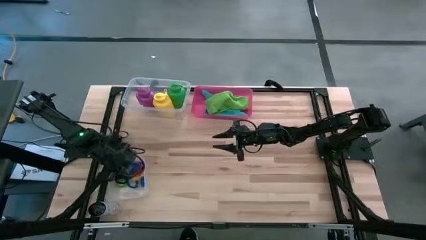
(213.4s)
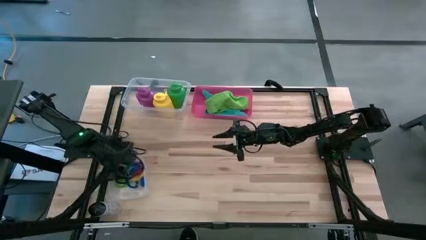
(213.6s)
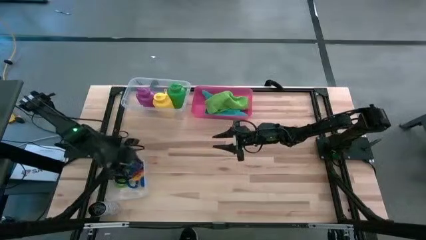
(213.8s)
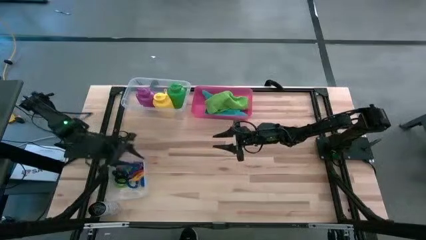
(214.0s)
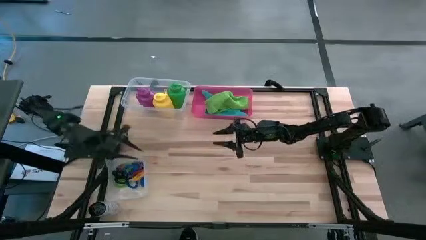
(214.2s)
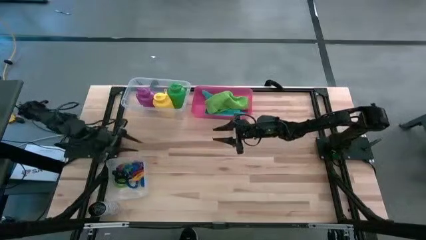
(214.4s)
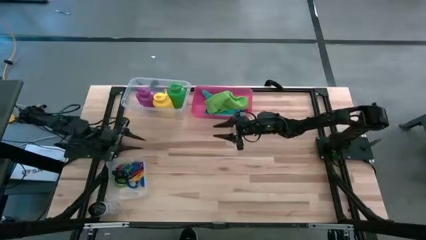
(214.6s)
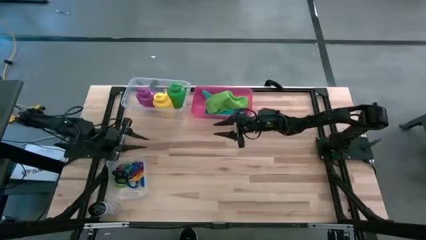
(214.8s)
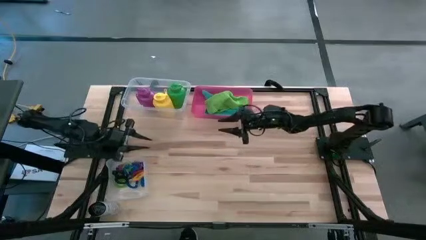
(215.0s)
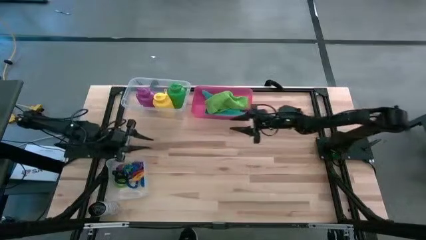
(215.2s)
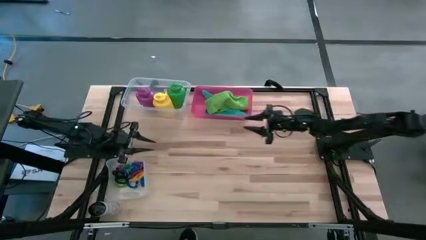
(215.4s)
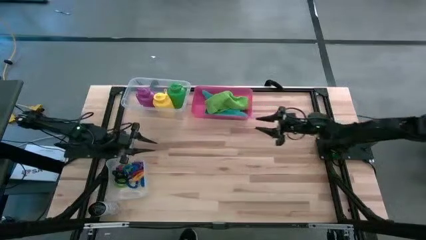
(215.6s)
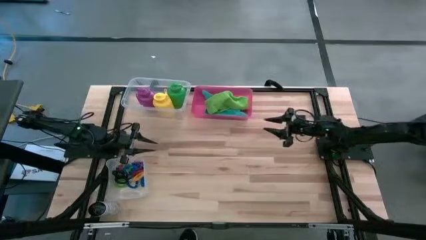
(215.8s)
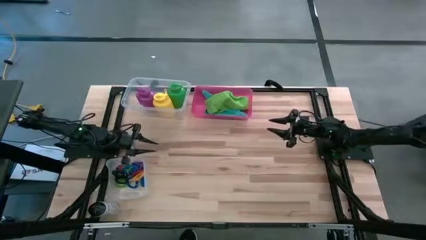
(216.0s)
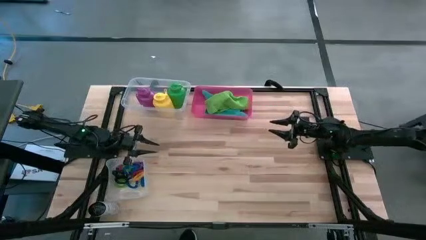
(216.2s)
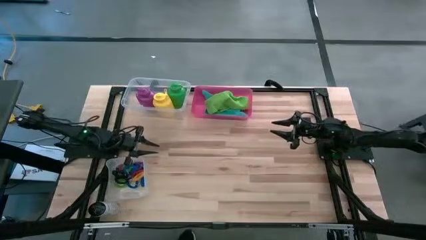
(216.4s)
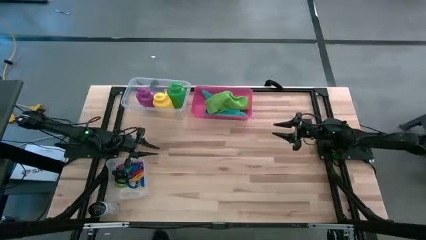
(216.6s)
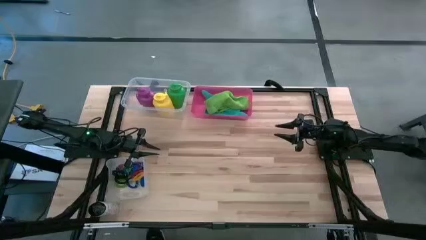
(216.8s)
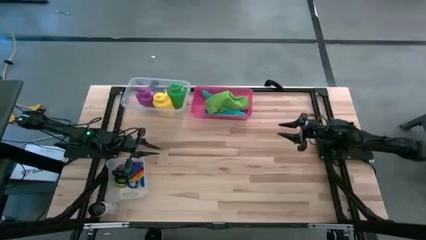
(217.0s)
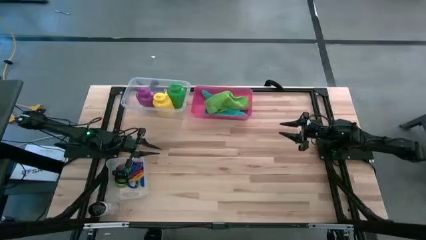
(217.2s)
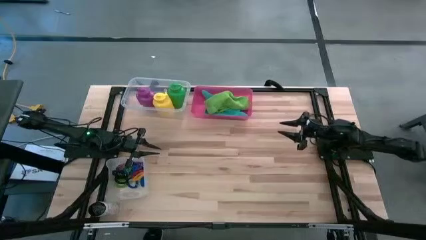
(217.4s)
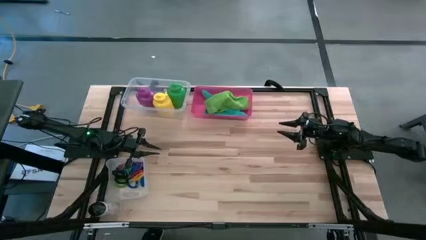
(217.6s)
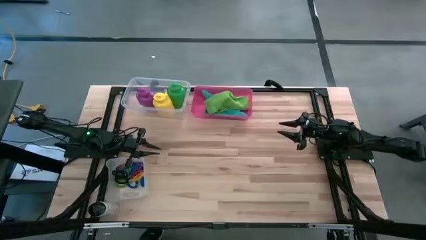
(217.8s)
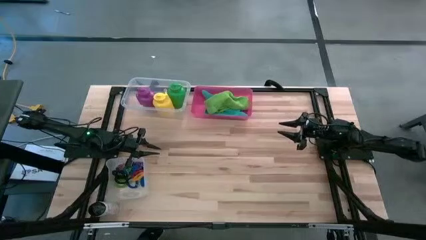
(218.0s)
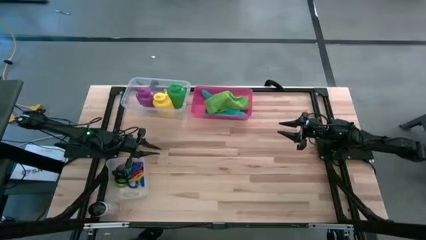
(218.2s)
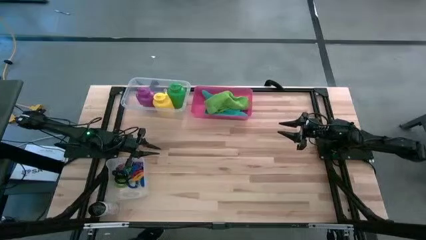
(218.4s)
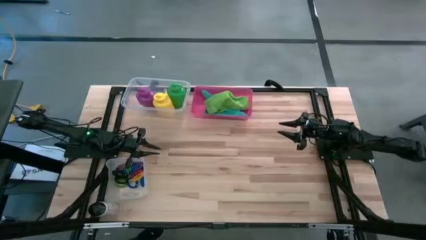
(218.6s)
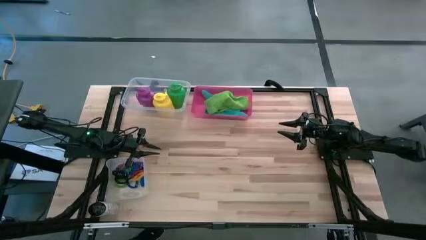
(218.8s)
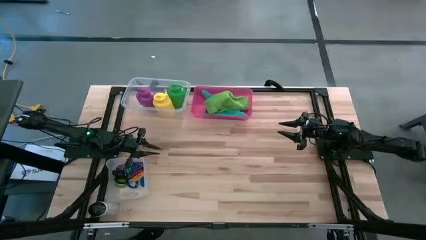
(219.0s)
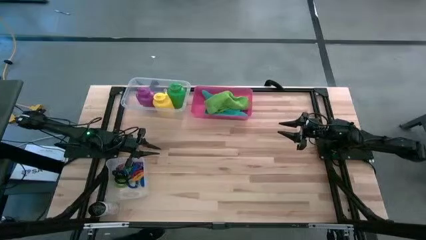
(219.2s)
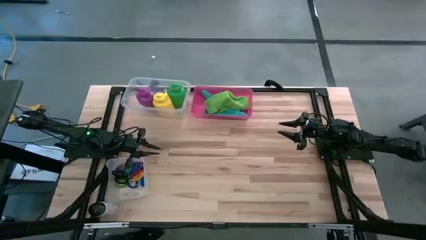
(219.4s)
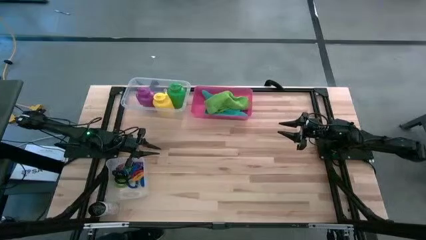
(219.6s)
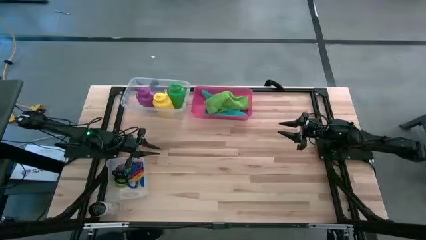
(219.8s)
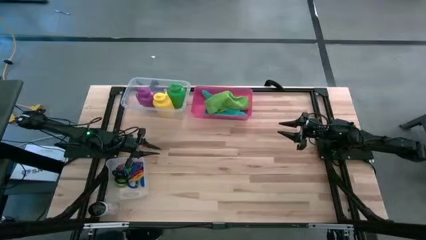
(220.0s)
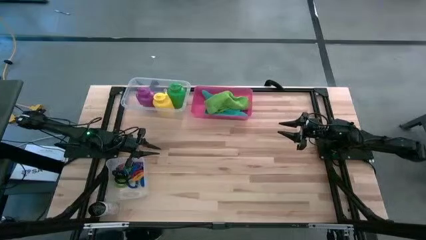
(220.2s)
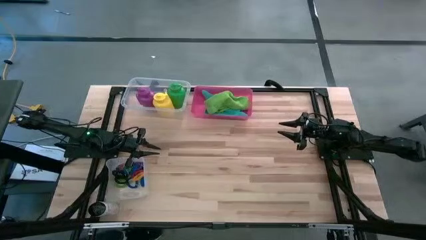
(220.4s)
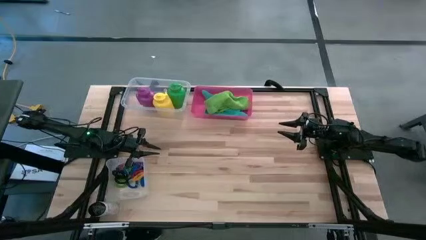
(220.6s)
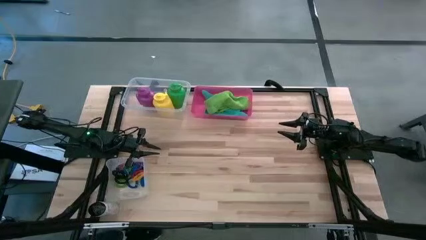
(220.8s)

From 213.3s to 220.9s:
Task: Pick & Place Sports Items
Return to Home Position

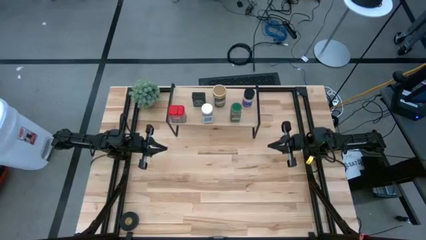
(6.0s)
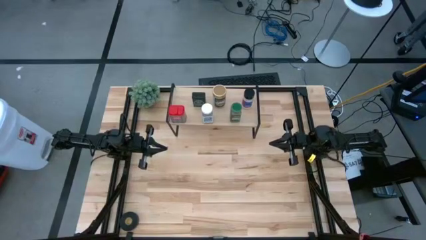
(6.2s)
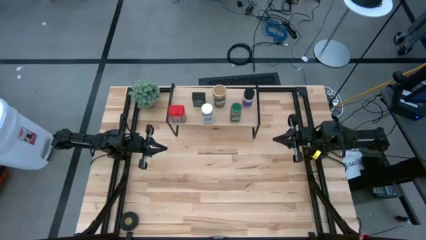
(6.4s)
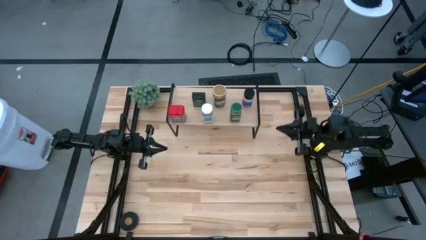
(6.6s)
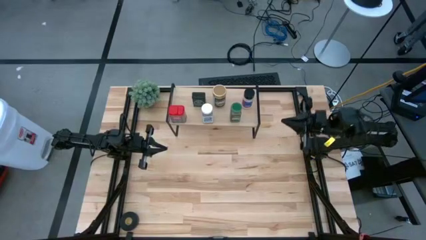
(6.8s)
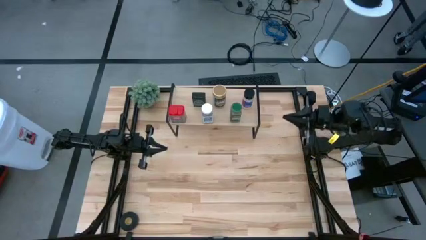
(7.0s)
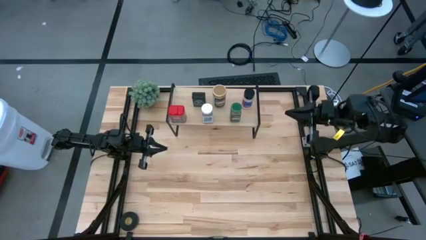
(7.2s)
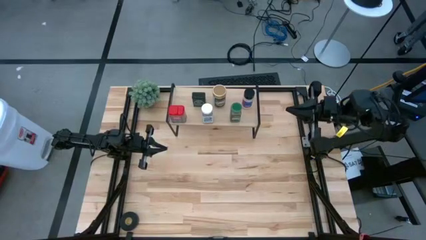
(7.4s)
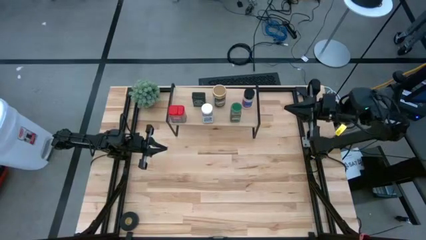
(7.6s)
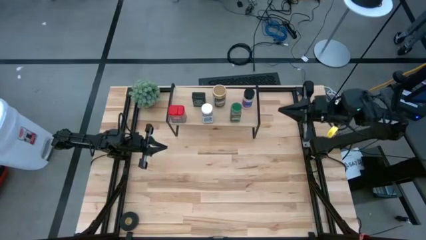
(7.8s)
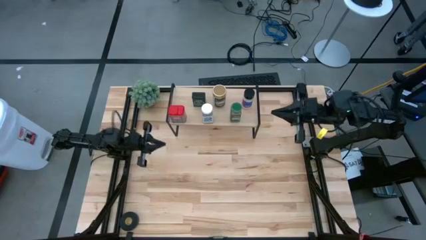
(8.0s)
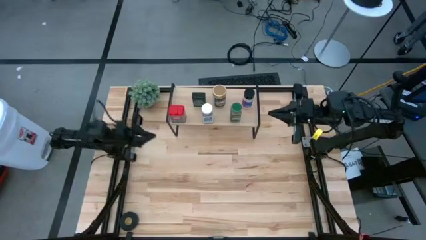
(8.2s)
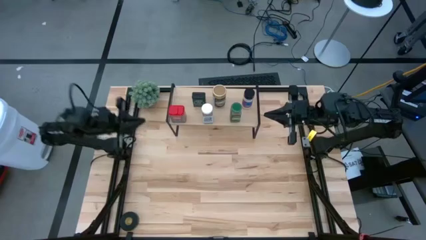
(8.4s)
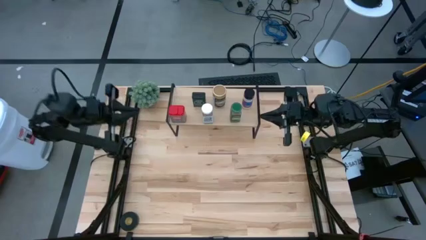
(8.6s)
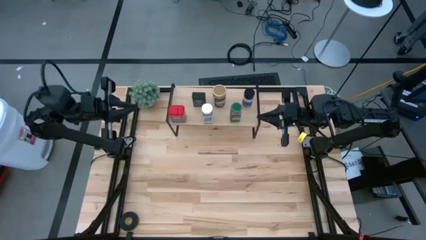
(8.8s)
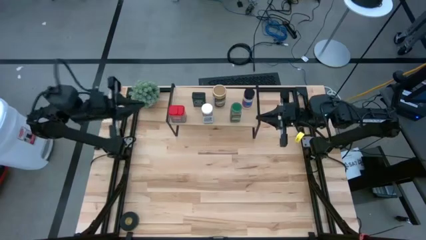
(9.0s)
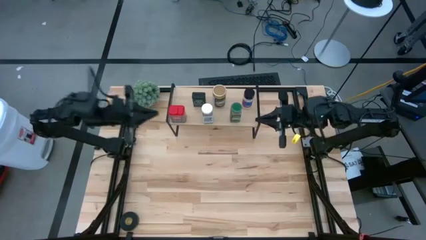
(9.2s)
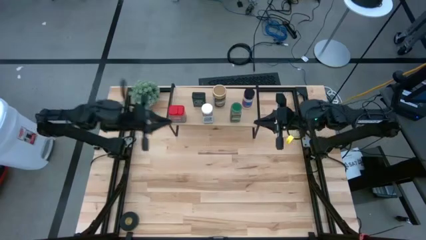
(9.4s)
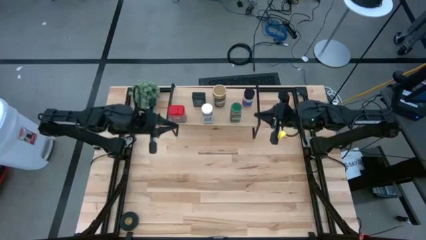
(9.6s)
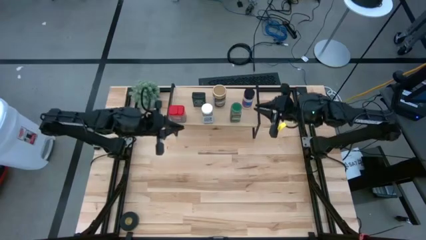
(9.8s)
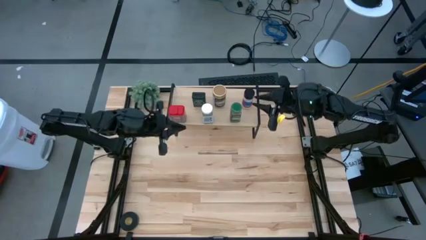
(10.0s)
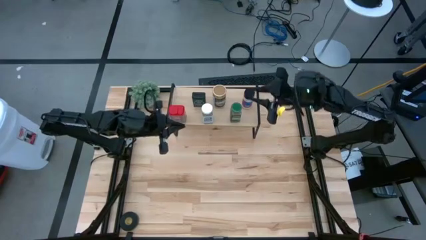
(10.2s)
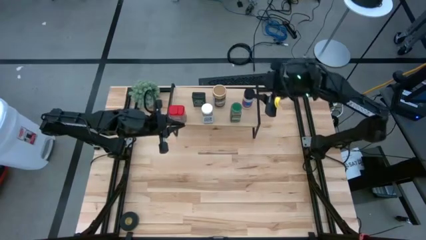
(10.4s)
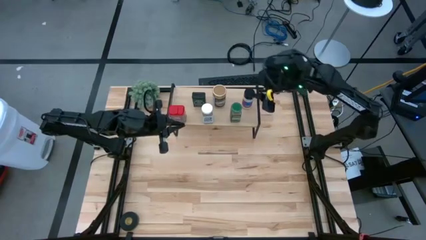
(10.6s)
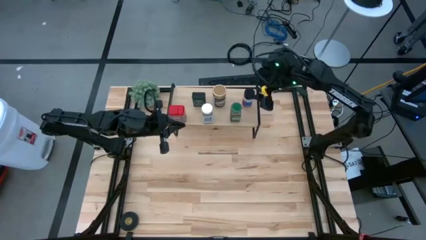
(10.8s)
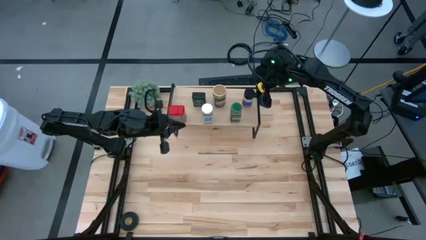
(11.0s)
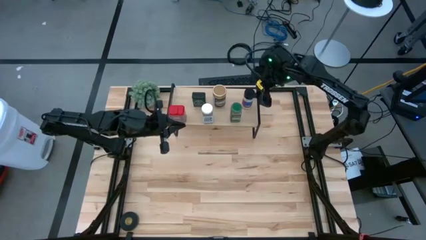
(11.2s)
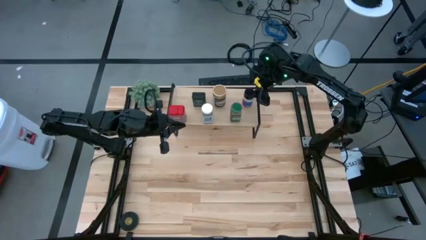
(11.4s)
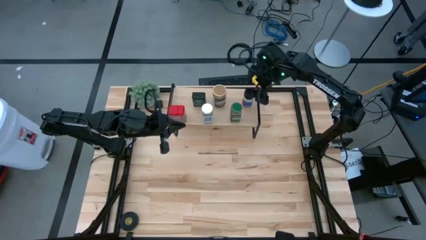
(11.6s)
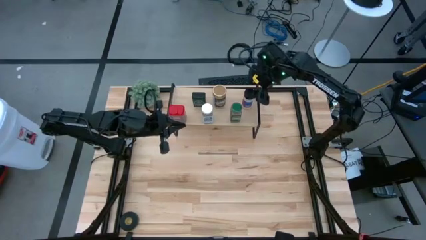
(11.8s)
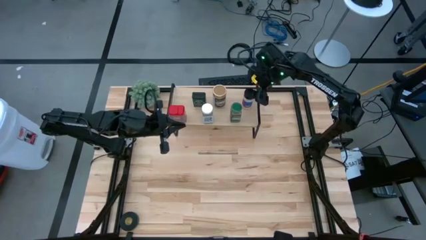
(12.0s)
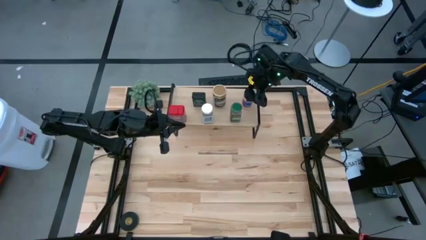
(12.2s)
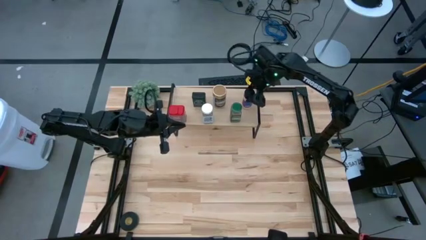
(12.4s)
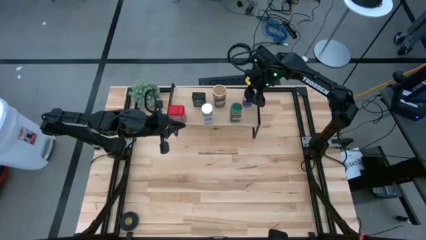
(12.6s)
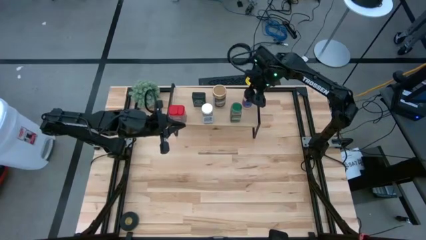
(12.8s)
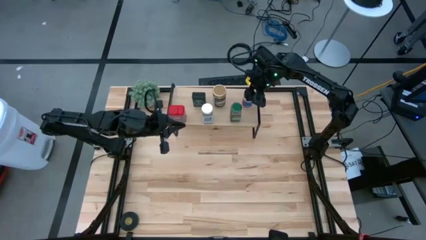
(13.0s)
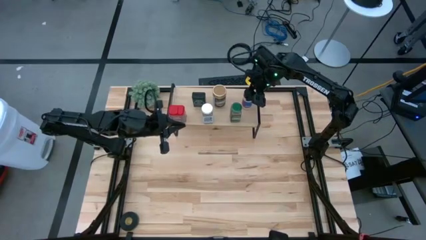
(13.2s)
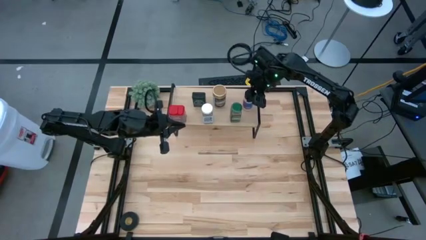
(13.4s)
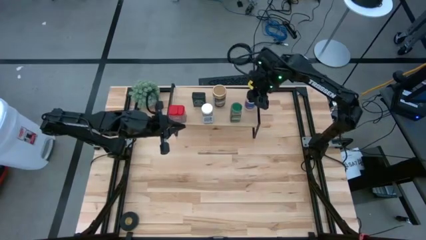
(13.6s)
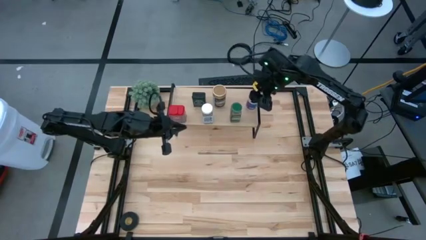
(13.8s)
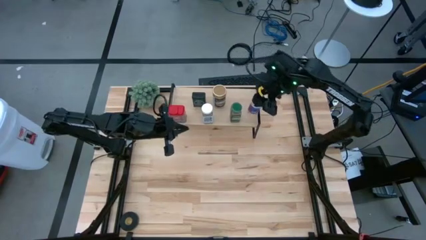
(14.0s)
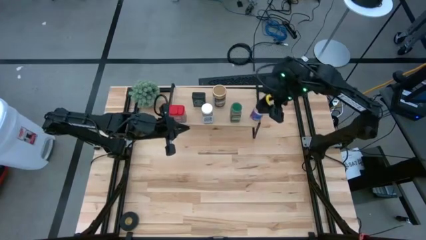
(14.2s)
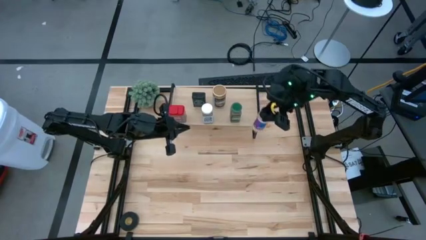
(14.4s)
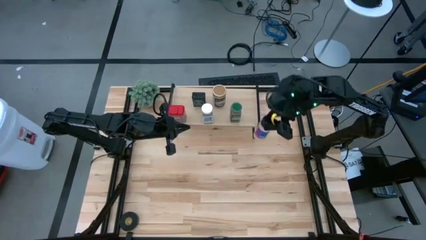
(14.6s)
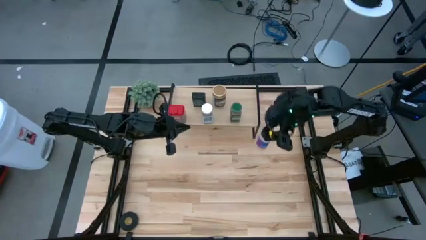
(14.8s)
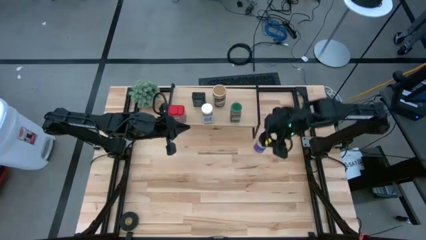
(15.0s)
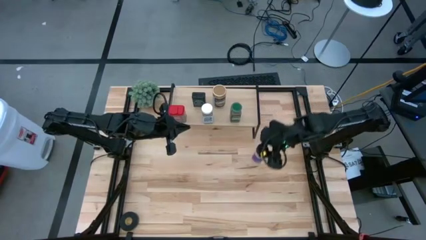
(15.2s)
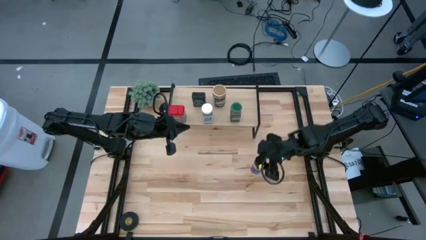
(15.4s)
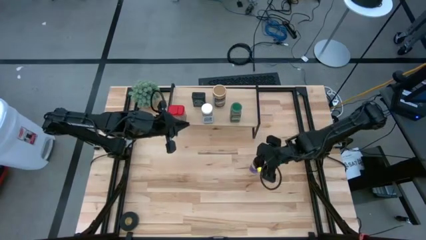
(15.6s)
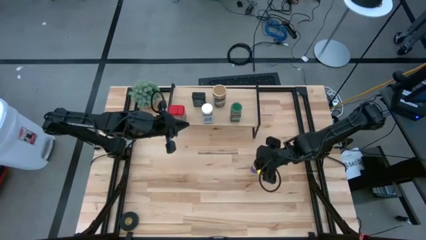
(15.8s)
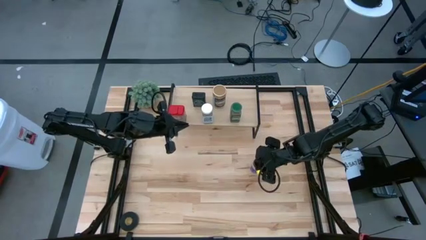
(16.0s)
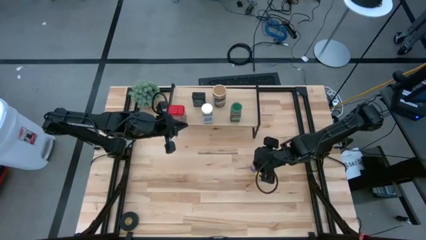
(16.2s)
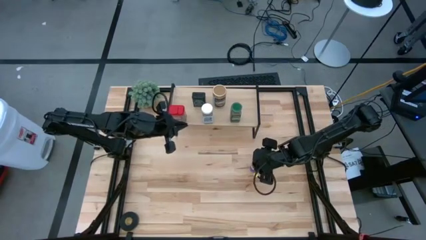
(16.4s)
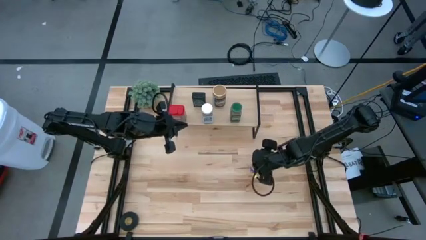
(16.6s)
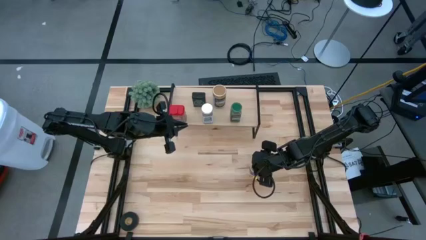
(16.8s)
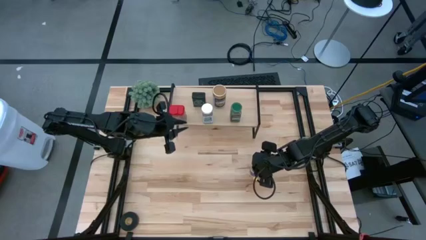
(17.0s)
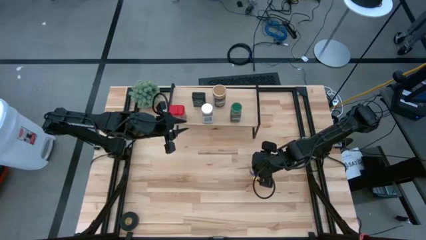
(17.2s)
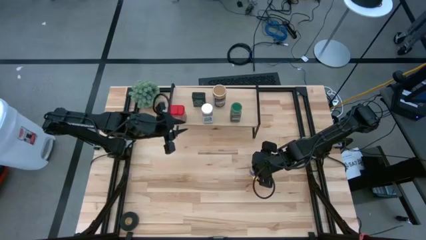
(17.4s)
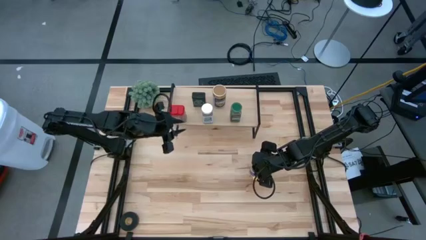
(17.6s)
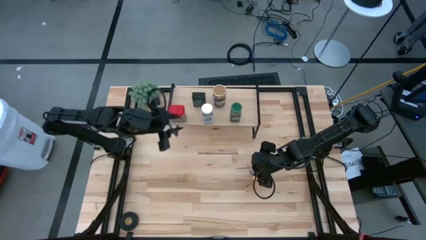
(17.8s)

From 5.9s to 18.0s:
Task: Shelf spices
Remove the black seasoning bottle from the shelf
